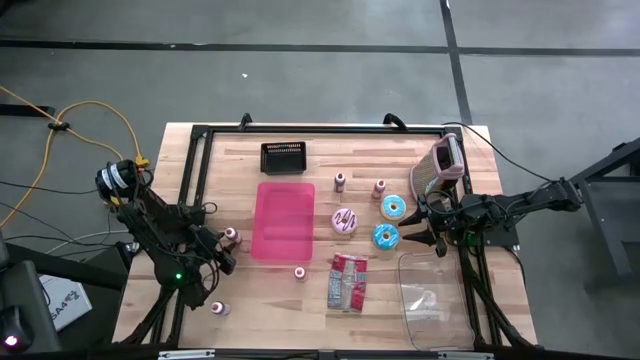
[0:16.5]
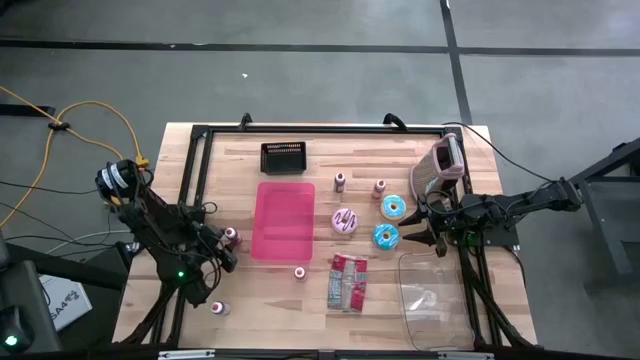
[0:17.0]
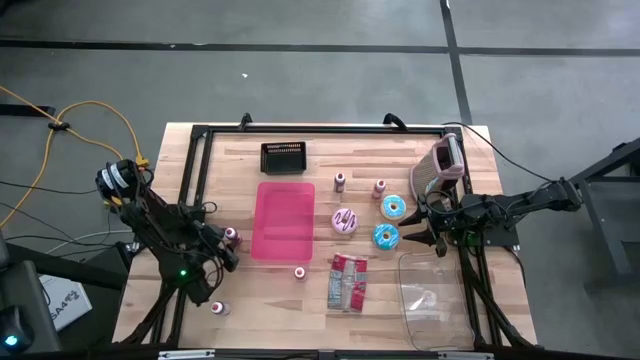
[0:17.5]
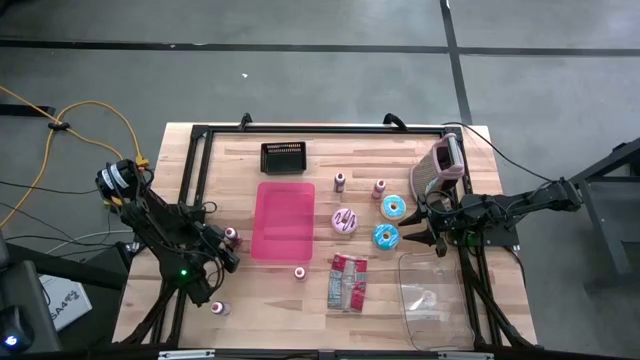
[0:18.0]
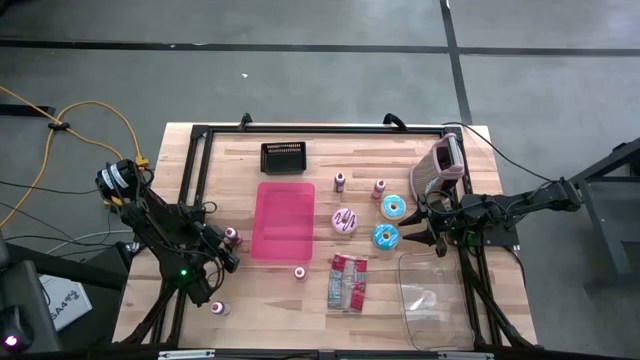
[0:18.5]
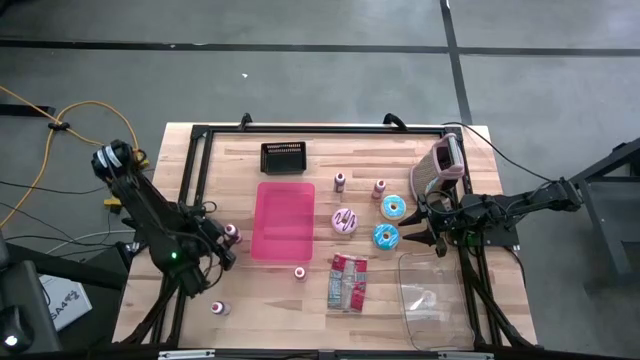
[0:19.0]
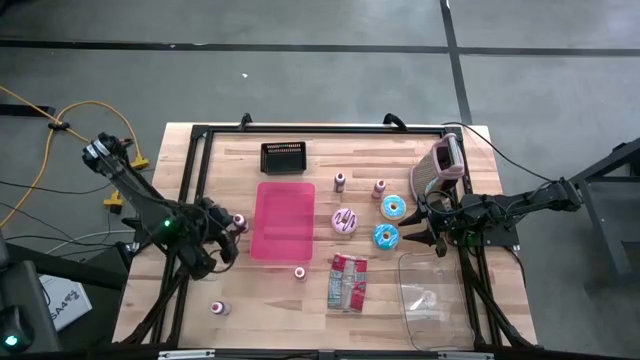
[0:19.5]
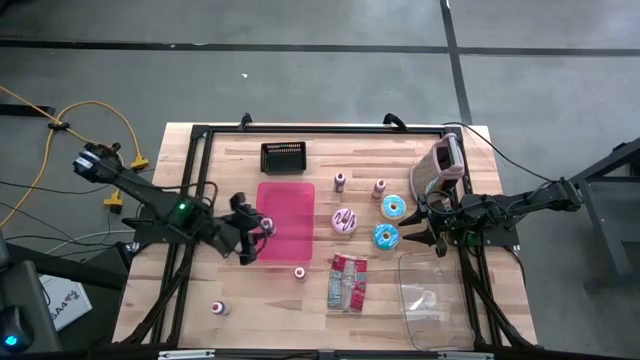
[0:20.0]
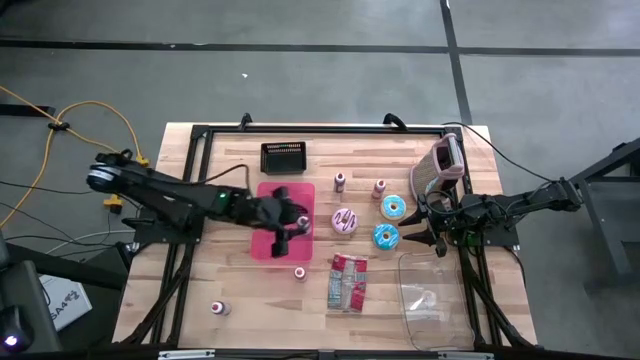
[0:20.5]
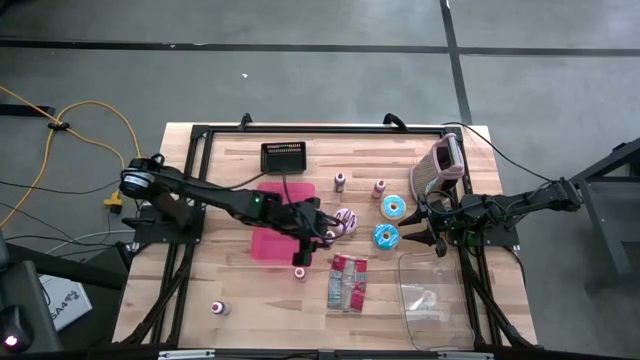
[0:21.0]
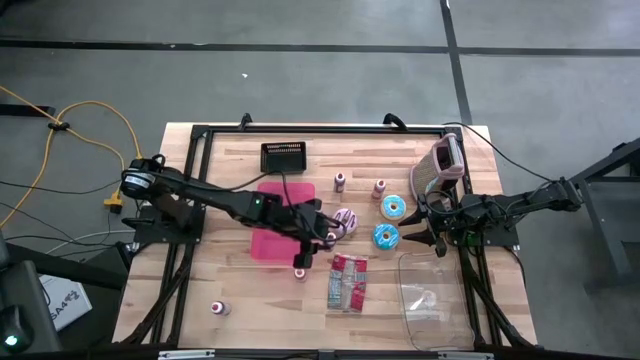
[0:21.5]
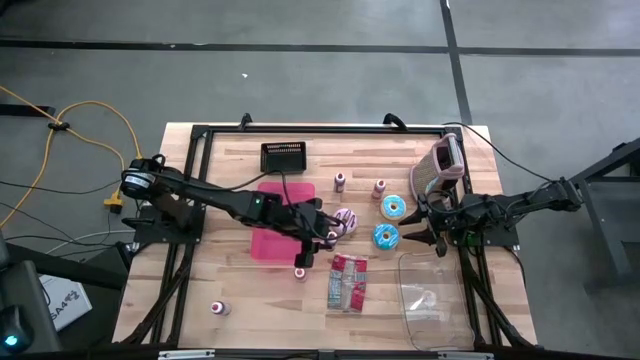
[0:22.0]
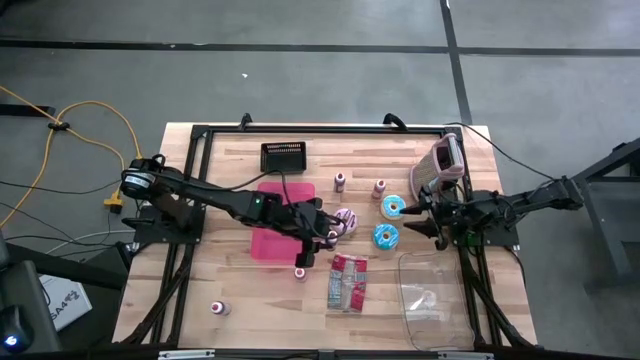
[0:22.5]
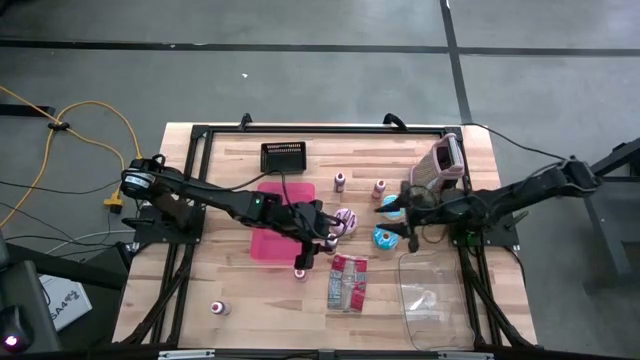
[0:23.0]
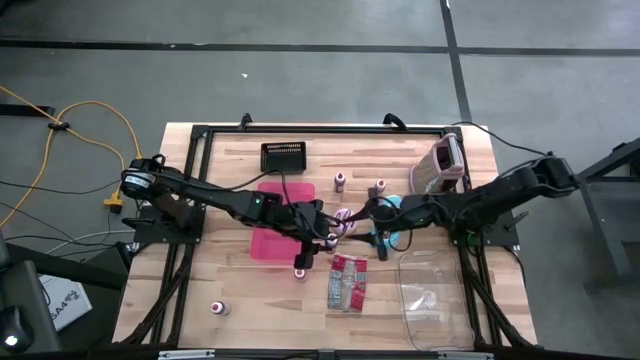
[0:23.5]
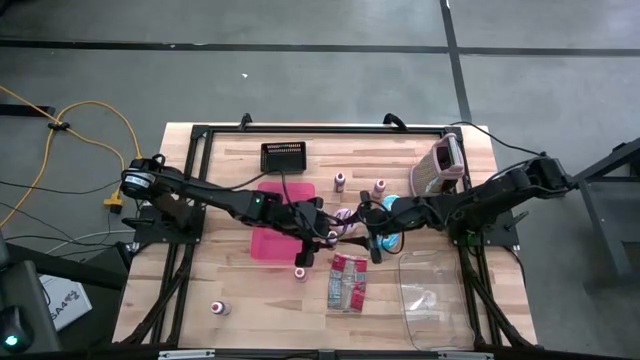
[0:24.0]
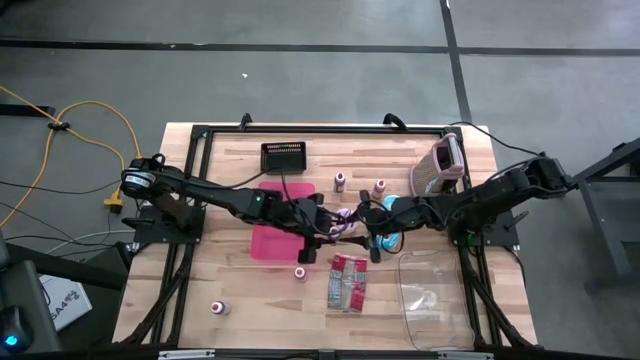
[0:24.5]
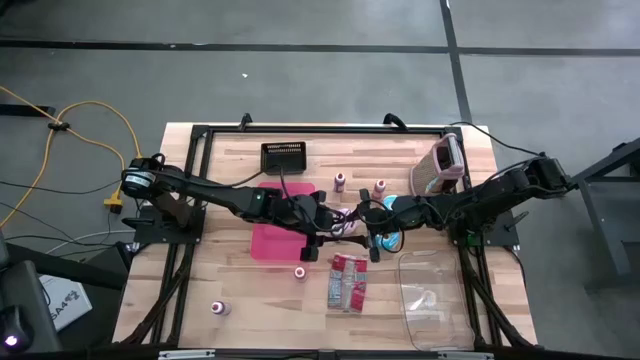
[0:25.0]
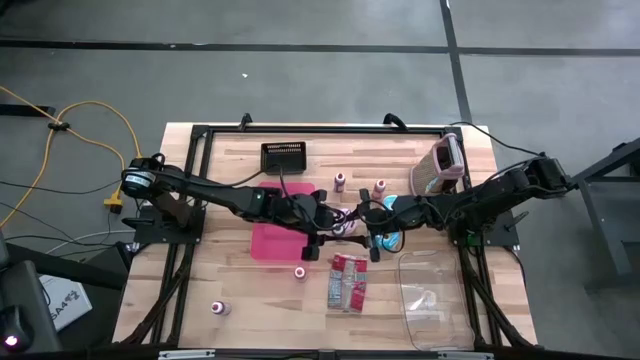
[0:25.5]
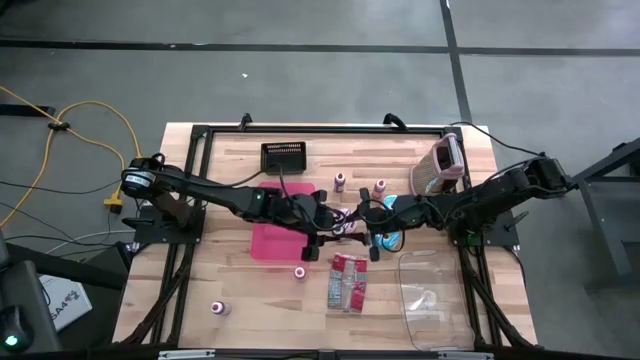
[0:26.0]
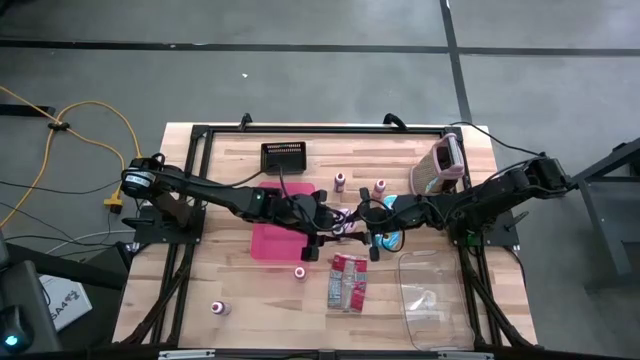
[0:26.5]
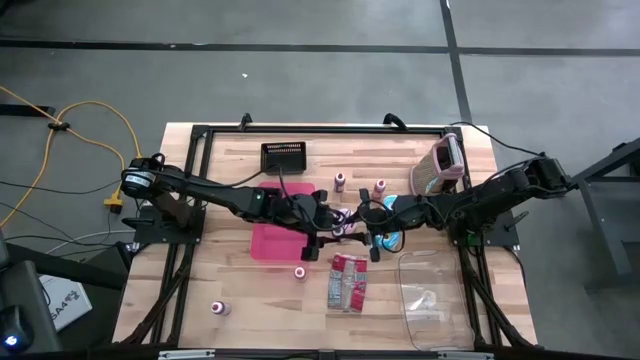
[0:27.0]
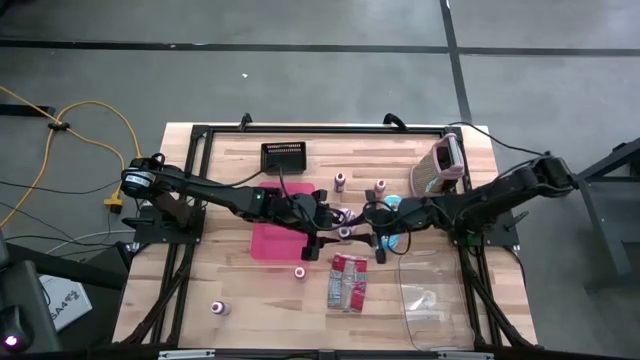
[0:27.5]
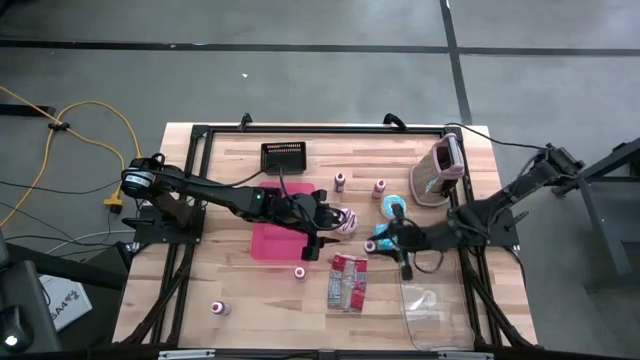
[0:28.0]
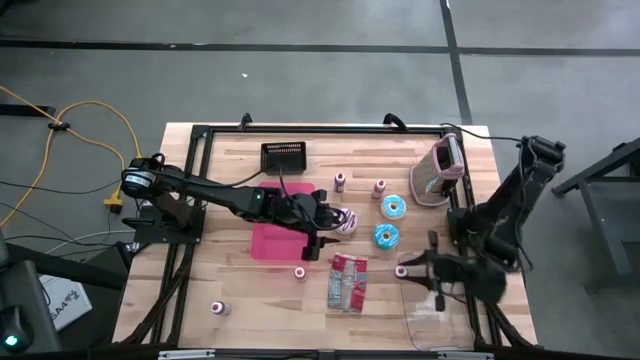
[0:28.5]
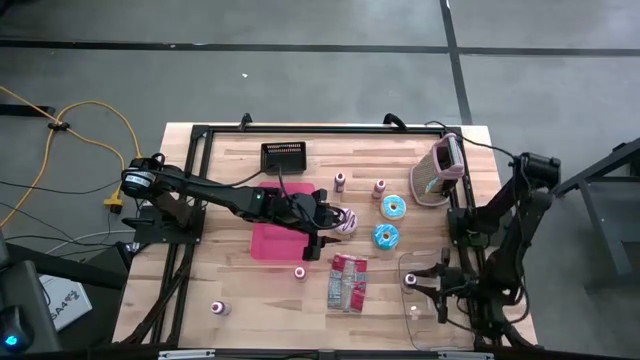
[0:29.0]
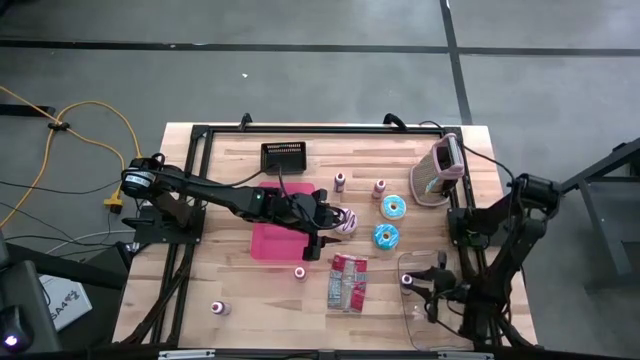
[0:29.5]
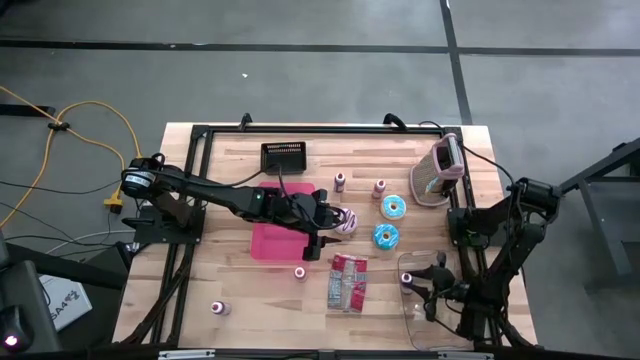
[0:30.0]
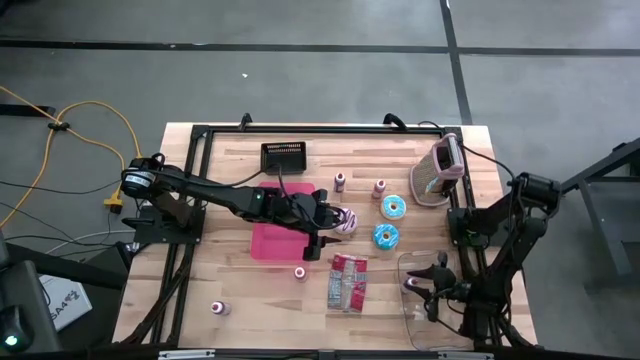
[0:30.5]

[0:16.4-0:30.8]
Put the middle red food coloring bottle into the transparent bin

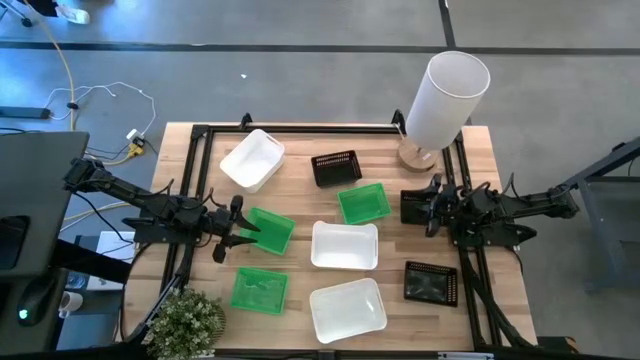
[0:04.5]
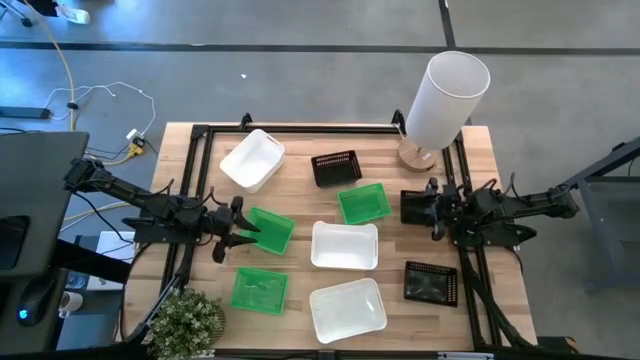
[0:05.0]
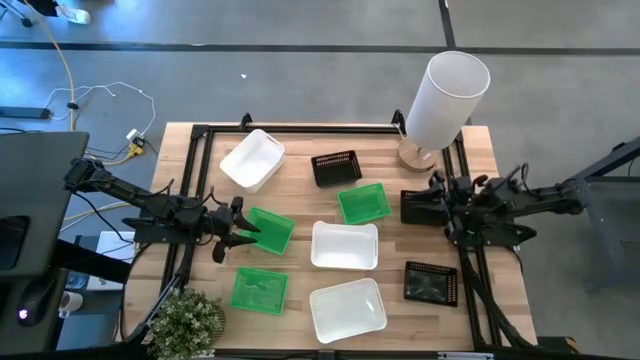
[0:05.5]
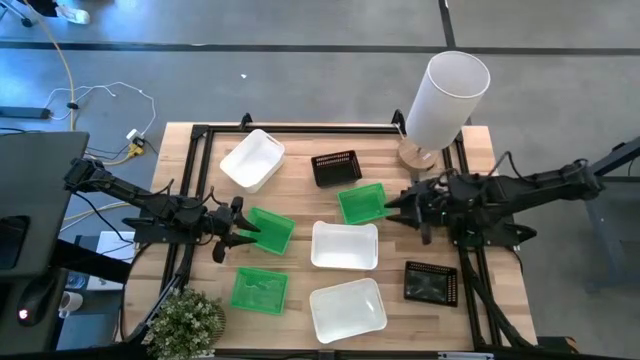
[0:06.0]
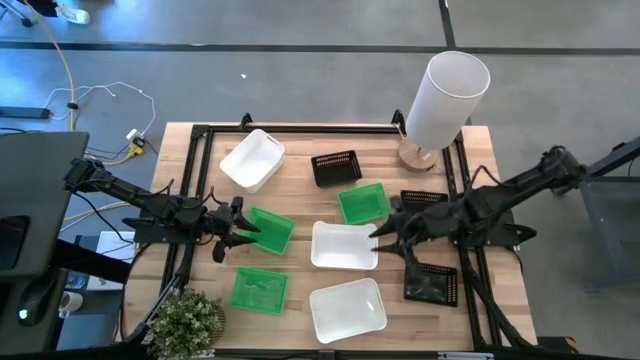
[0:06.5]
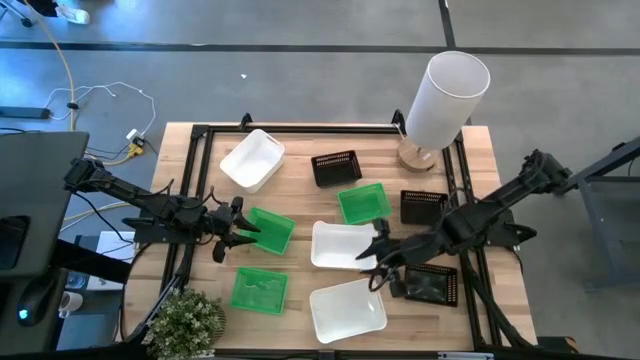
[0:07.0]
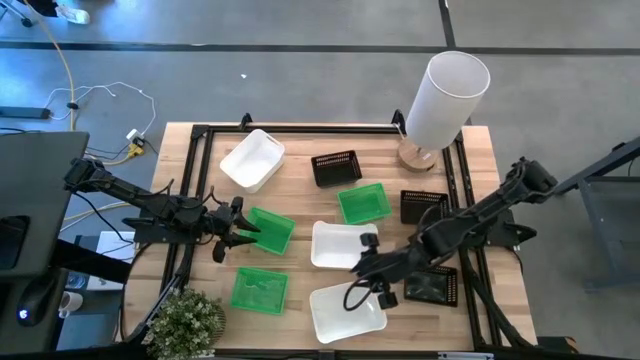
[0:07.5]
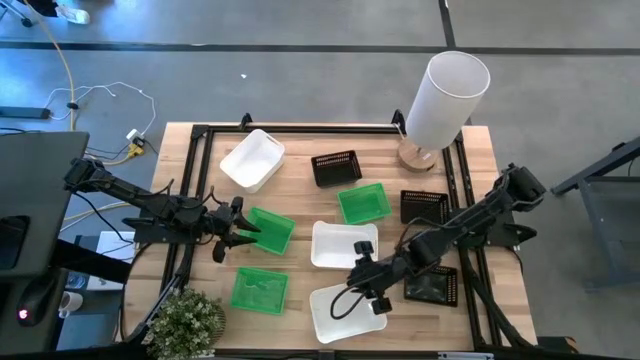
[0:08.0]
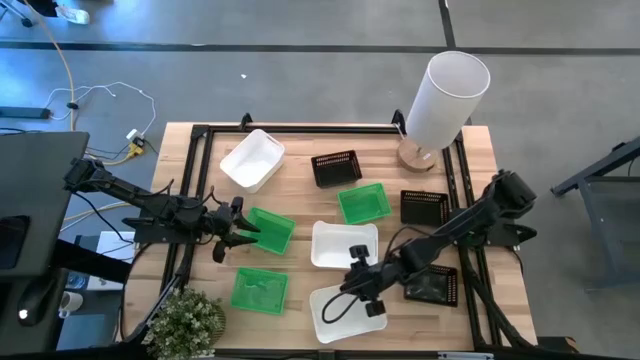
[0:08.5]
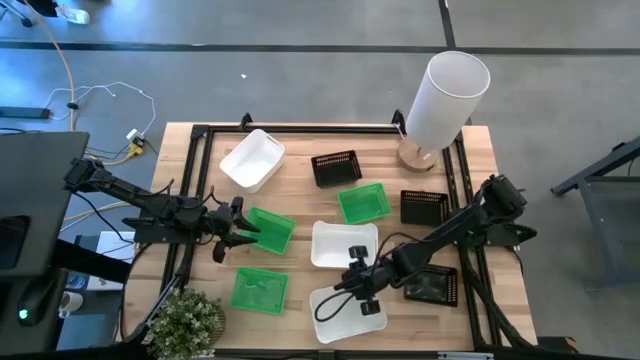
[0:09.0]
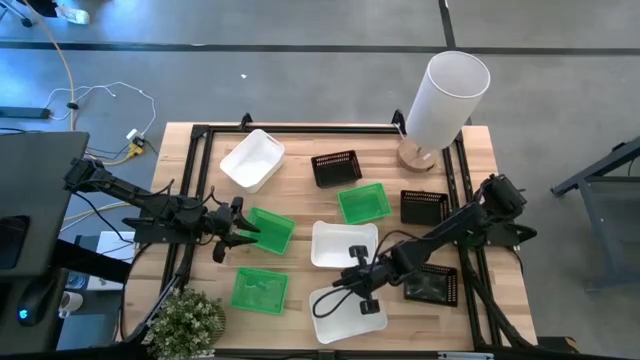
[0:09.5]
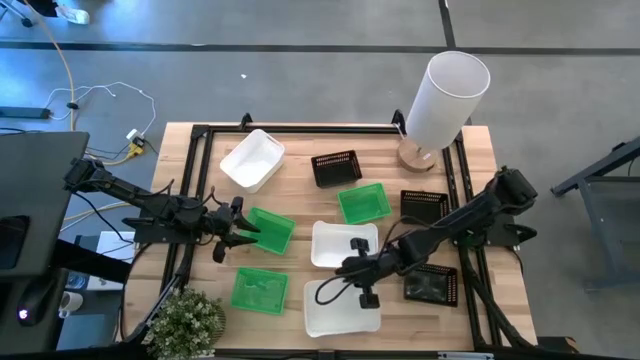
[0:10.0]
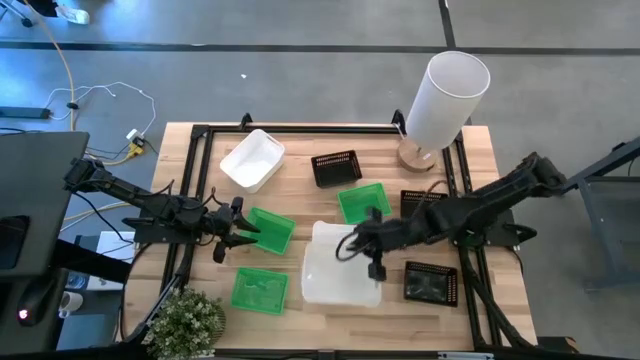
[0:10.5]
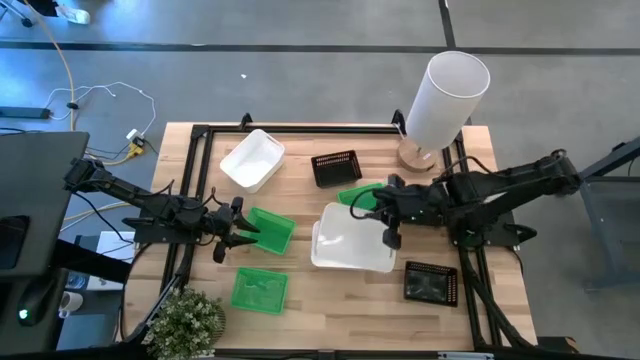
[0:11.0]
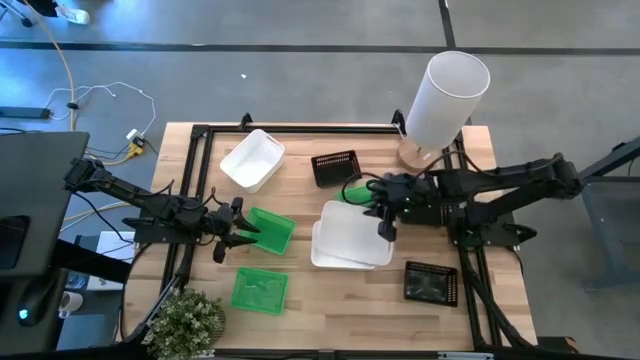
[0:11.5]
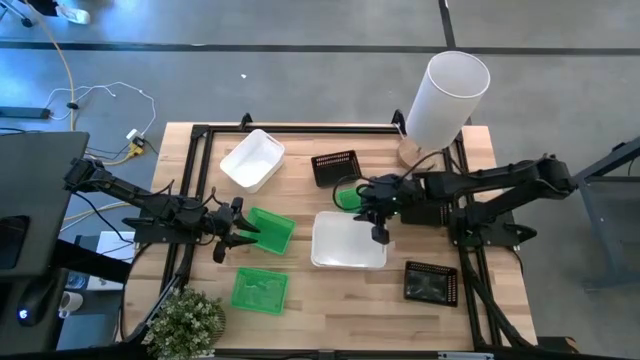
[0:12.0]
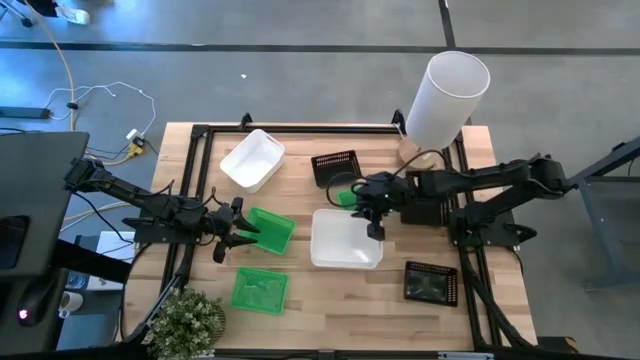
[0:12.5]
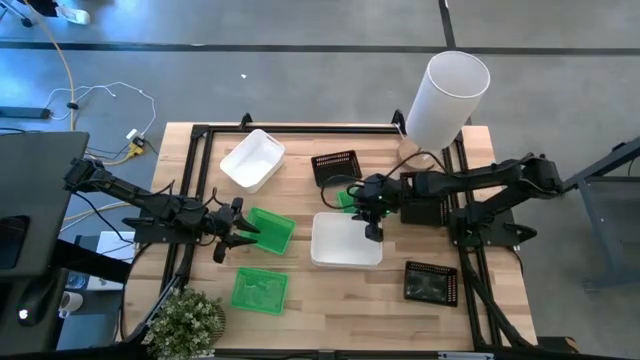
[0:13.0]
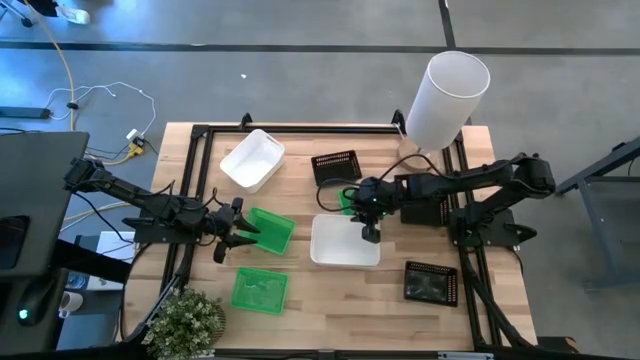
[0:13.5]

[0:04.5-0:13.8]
Stack the bottom white bin on the middle white bin
